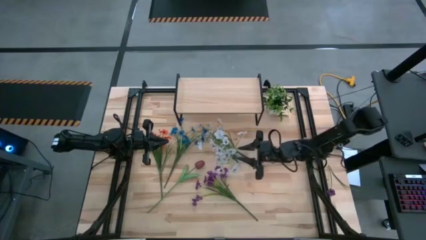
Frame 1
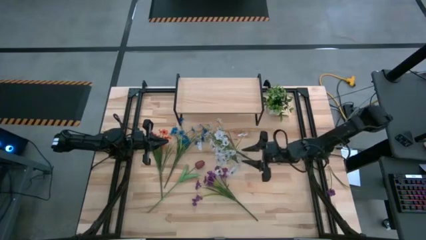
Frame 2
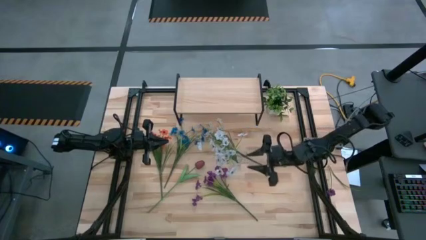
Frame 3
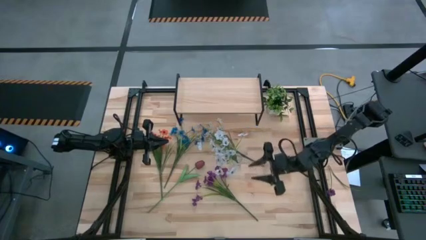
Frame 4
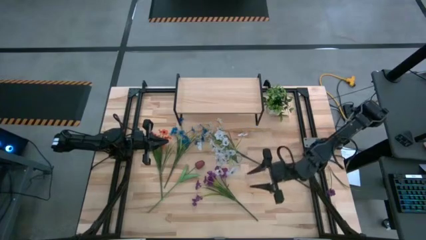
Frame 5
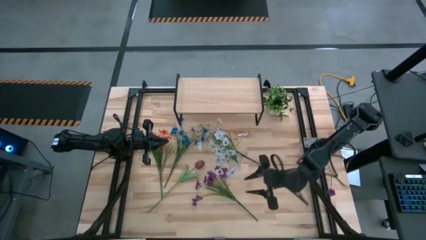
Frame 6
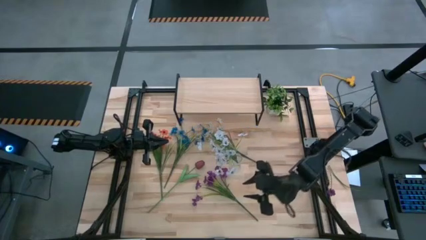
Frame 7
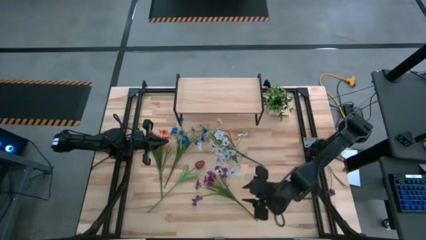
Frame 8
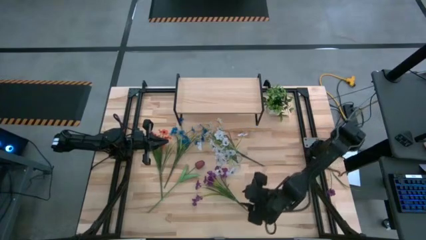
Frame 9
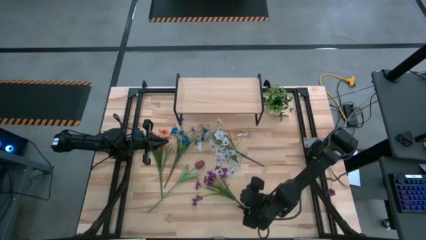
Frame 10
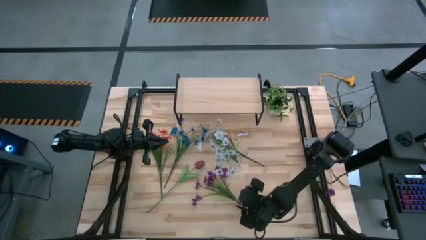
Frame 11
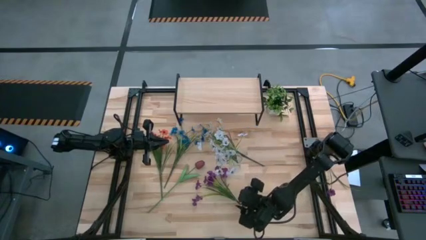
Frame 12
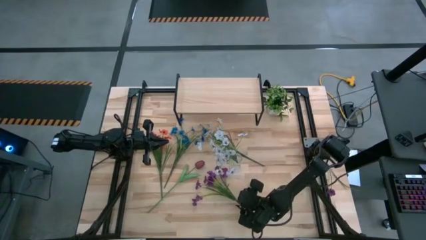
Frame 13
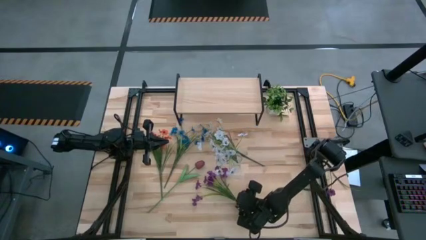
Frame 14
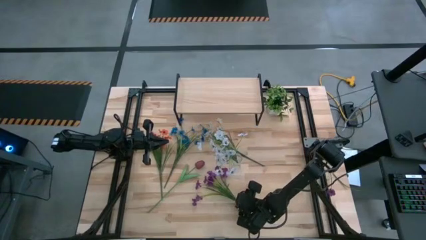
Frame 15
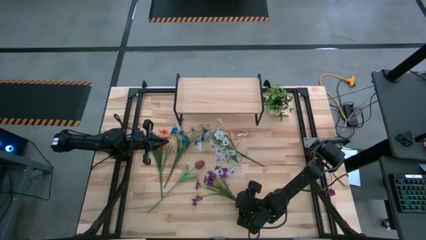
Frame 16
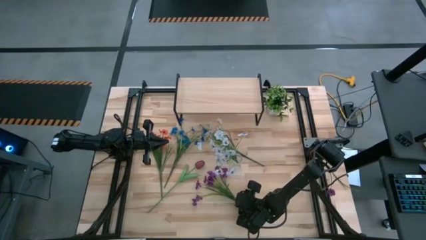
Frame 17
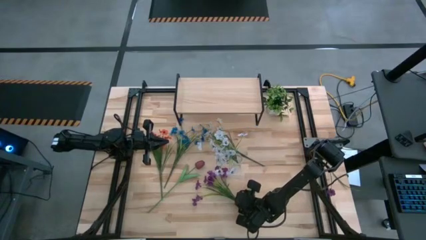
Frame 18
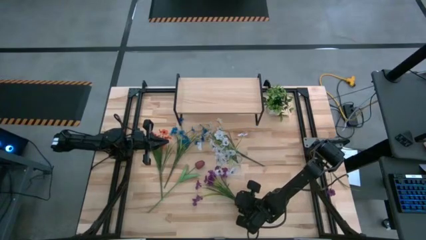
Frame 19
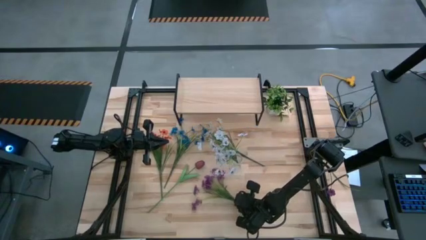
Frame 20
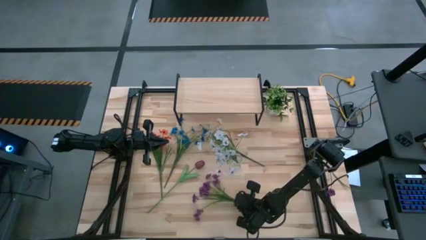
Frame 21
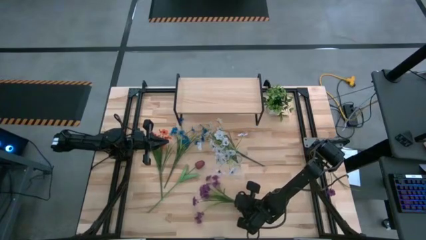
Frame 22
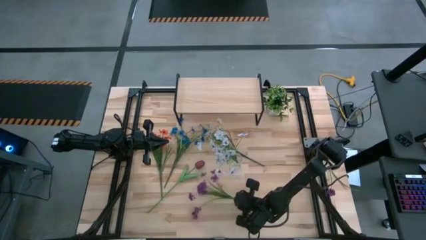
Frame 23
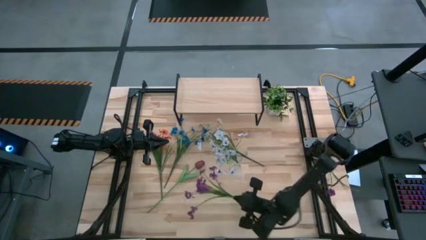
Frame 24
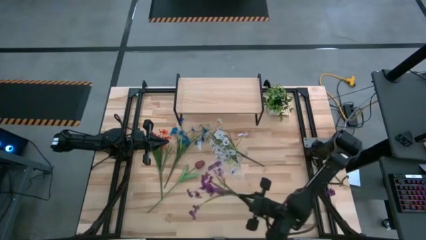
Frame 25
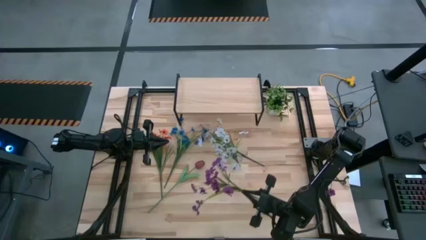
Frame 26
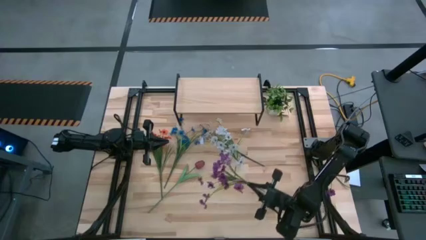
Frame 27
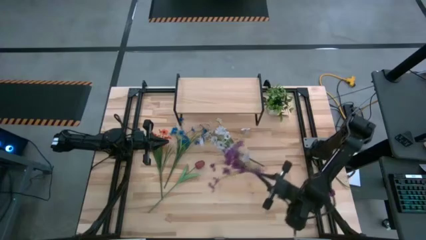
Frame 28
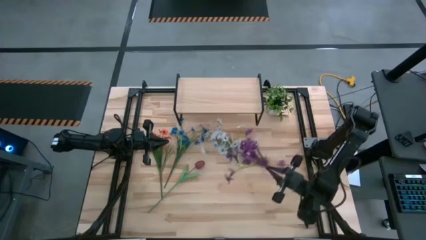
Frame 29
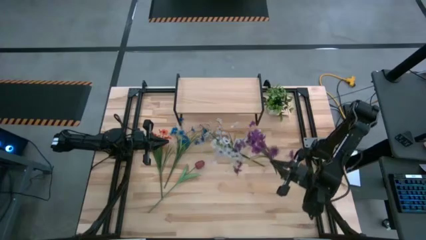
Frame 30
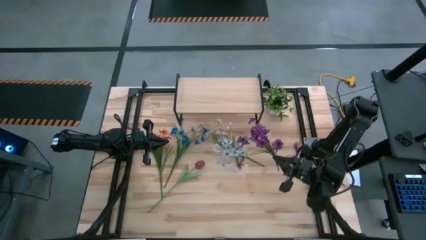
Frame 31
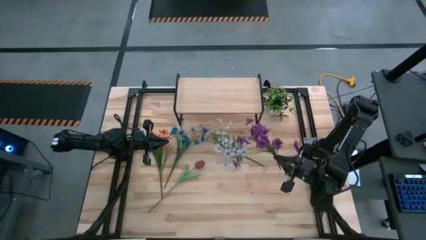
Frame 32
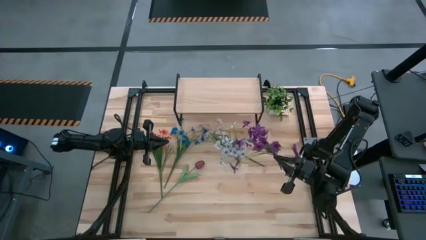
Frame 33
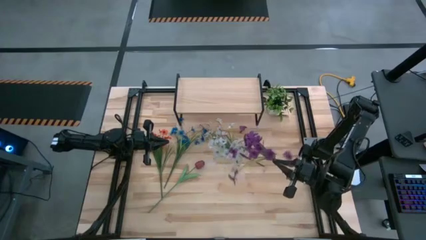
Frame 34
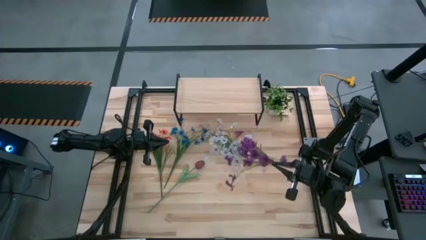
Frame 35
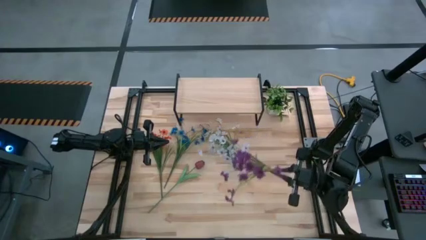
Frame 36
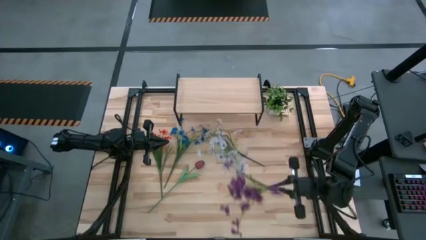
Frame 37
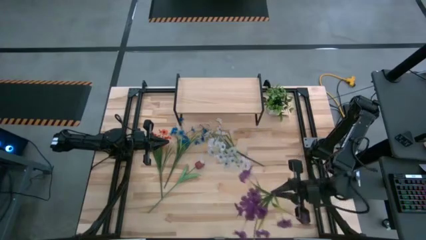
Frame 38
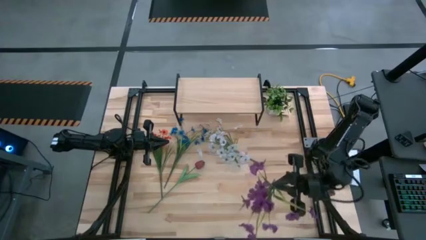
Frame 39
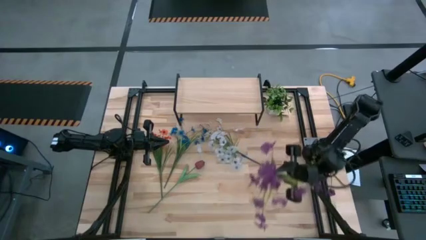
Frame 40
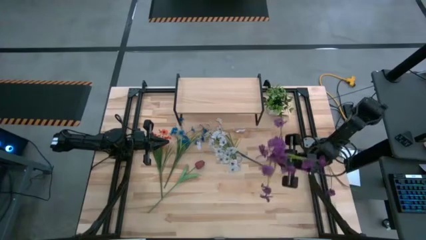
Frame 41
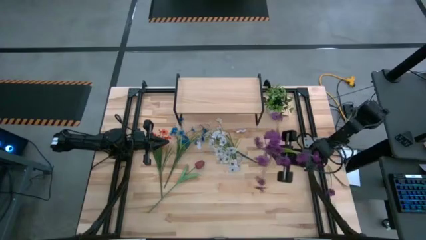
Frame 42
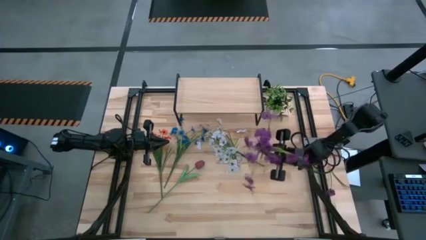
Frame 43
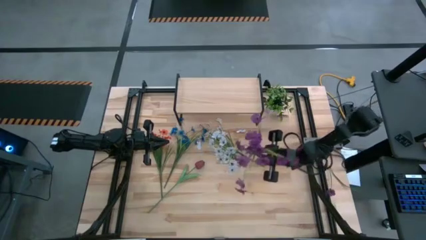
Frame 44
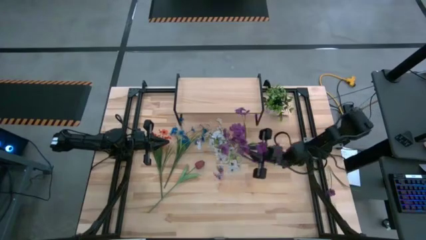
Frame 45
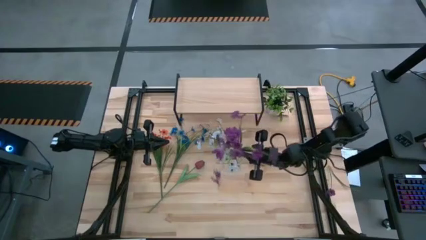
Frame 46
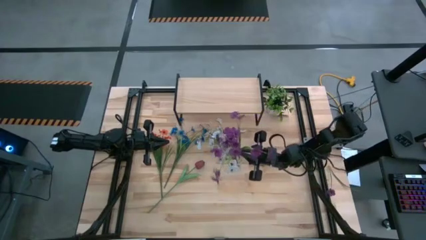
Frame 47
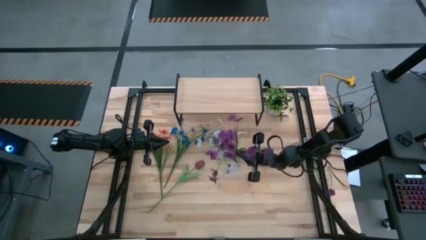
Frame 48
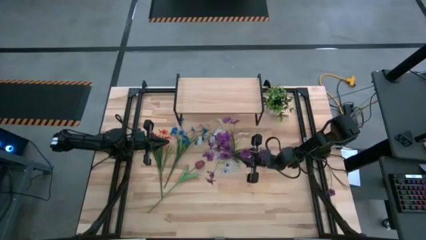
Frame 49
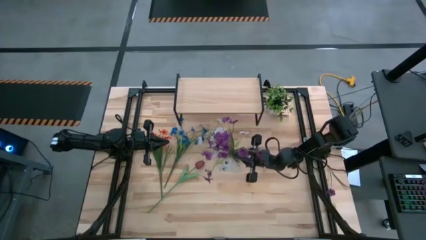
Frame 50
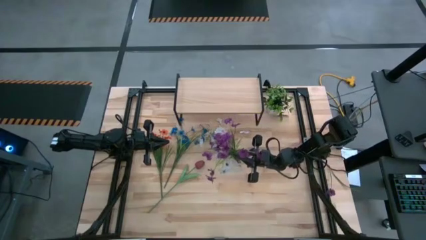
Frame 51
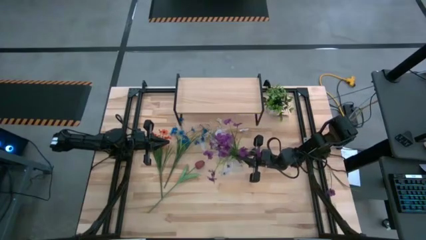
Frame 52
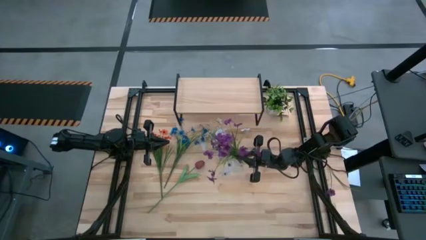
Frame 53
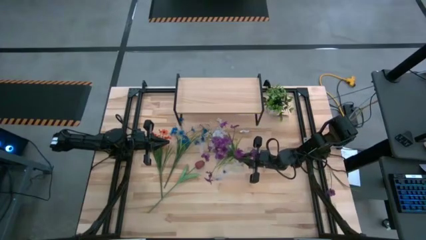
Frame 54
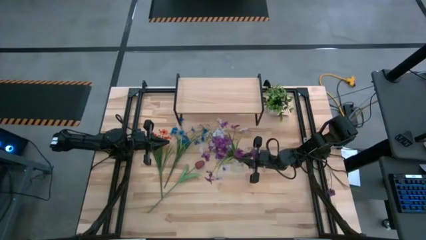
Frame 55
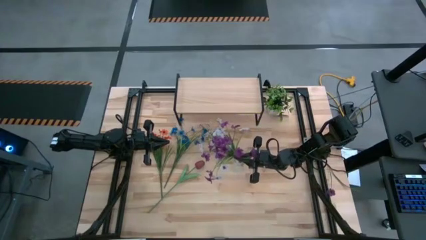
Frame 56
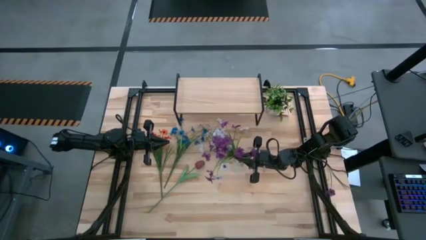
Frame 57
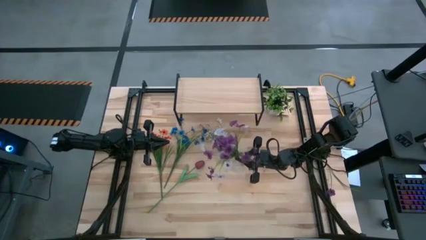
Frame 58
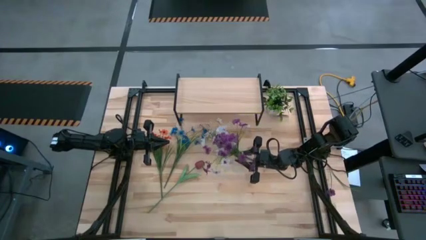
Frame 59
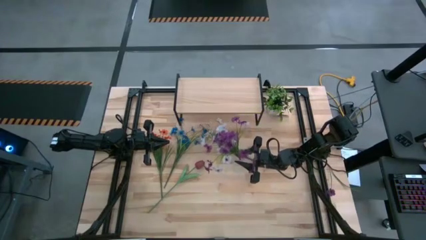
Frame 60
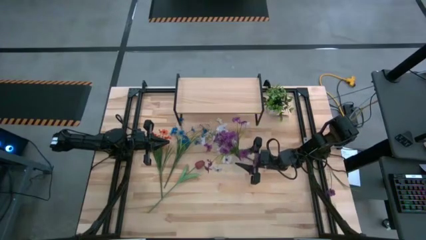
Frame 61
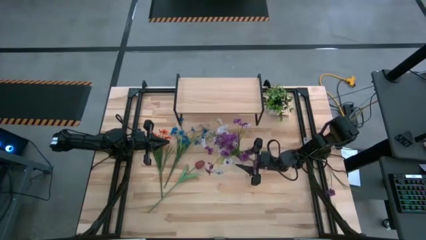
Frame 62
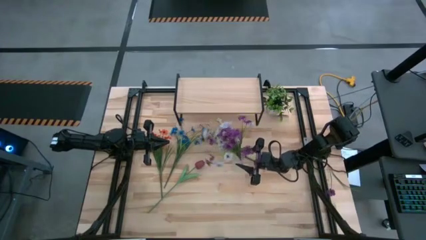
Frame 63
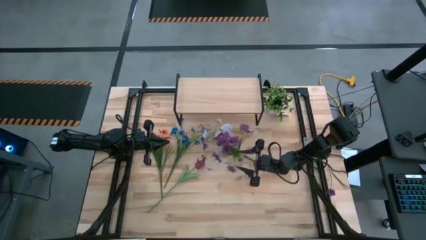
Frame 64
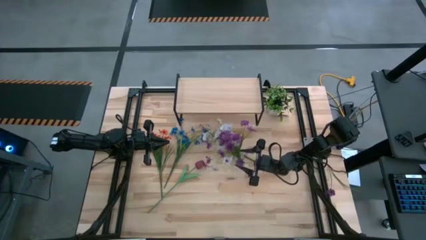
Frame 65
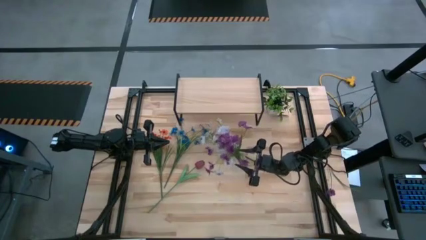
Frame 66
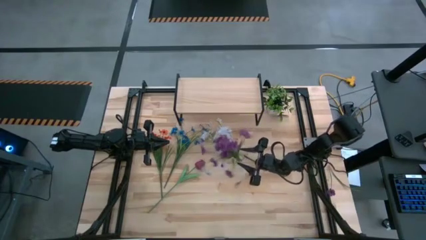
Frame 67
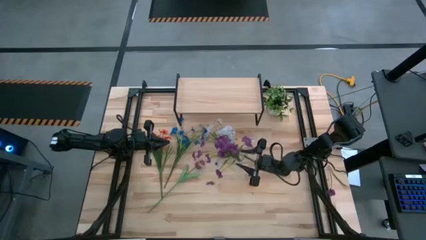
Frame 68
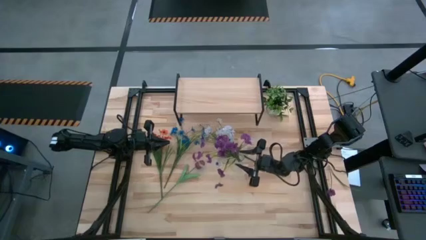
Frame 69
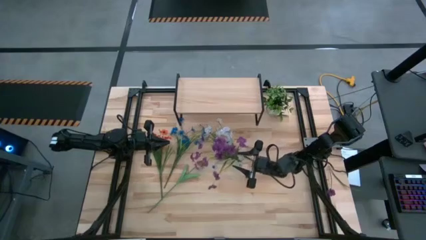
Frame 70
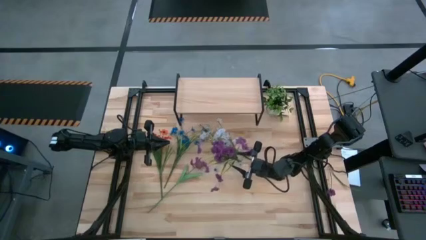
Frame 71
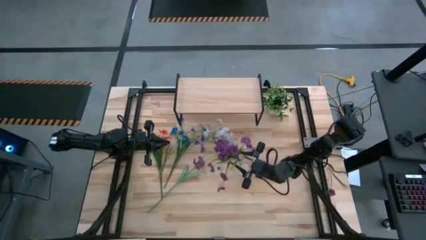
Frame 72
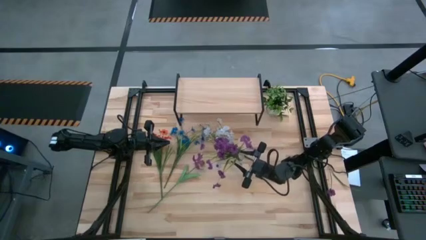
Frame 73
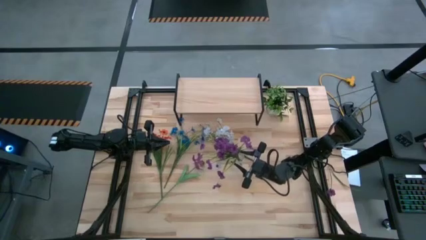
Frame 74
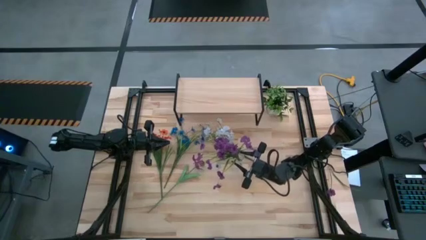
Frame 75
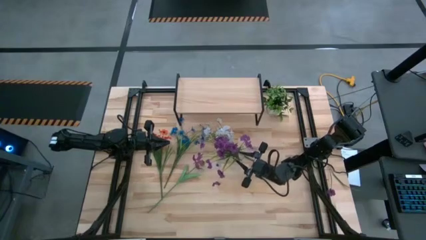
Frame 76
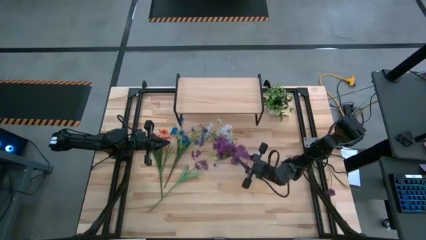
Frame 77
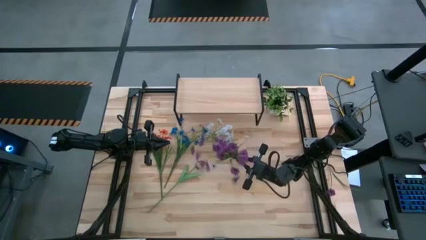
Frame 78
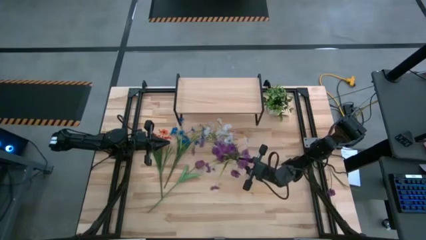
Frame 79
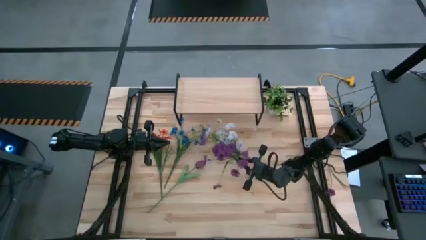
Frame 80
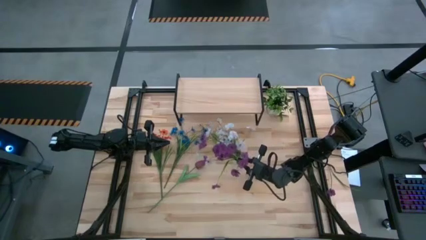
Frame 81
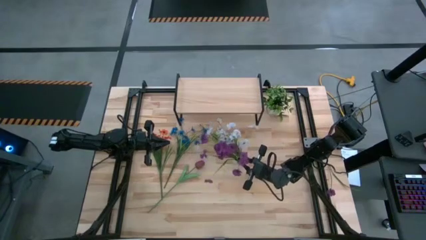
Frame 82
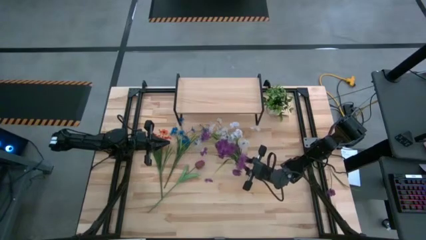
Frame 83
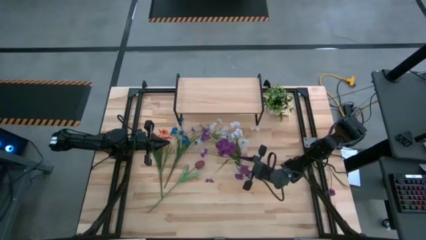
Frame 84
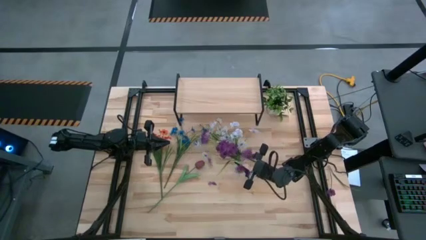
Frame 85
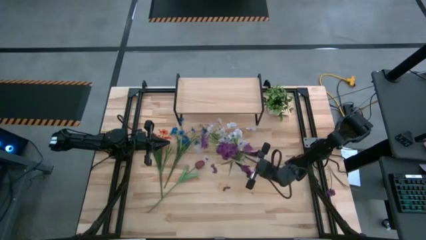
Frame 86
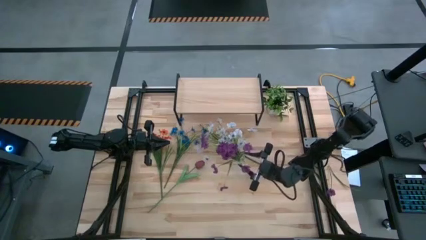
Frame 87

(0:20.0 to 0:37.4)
Task: Pick and place flowers into a vace then onto a shelf
Put the purple flowers into the transparent vase
